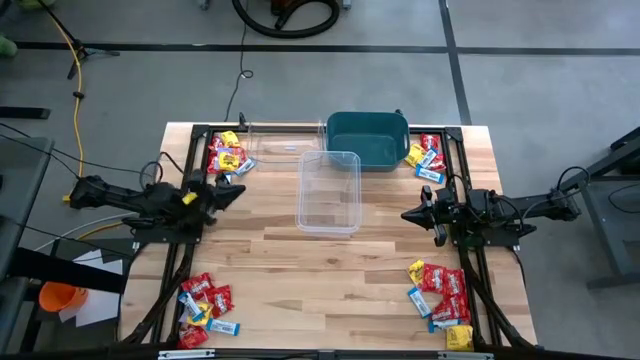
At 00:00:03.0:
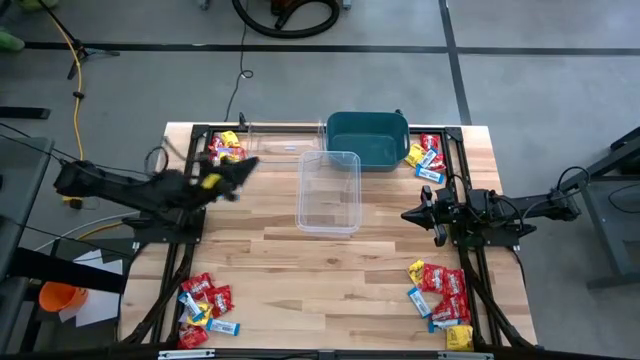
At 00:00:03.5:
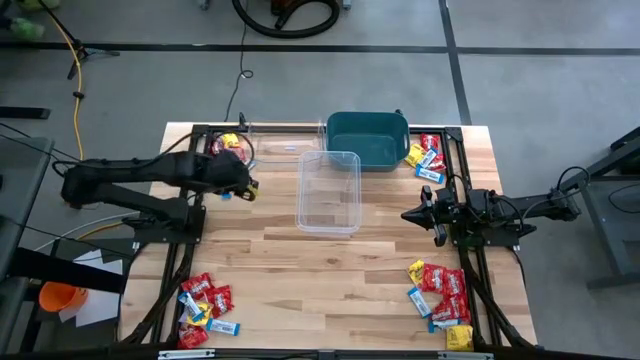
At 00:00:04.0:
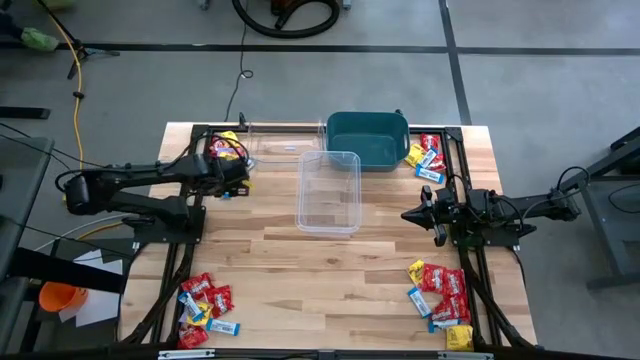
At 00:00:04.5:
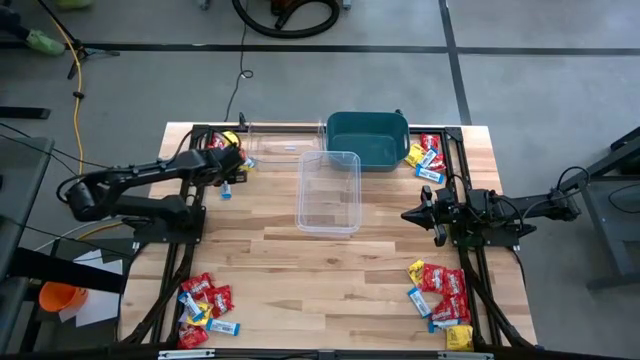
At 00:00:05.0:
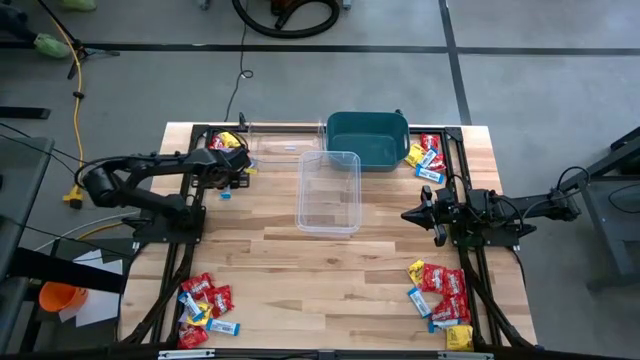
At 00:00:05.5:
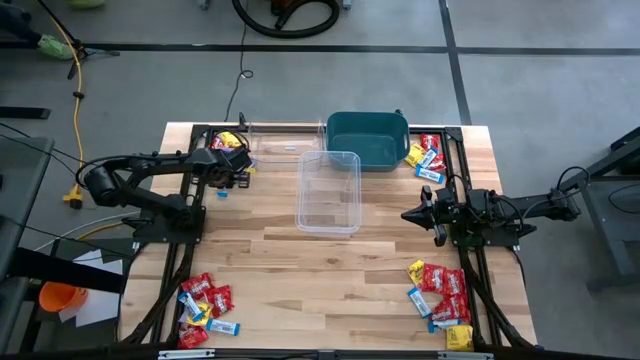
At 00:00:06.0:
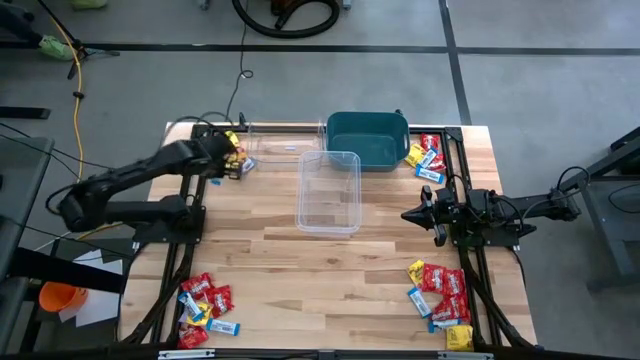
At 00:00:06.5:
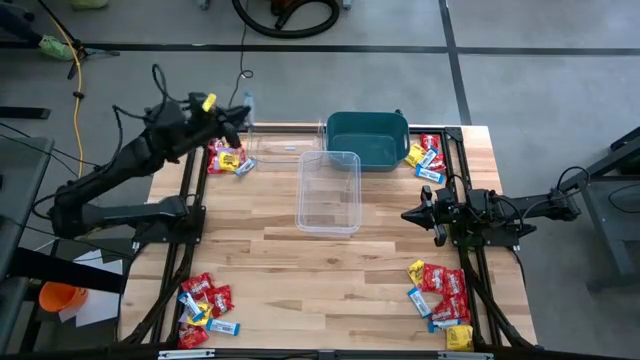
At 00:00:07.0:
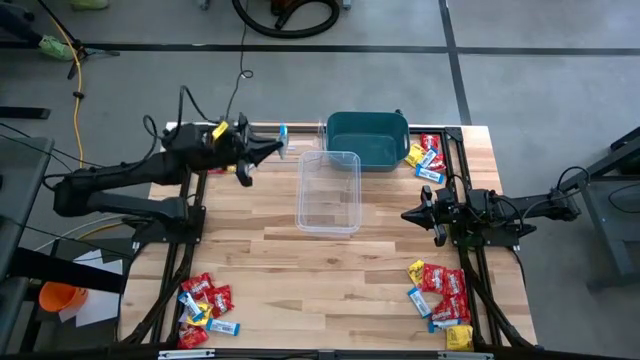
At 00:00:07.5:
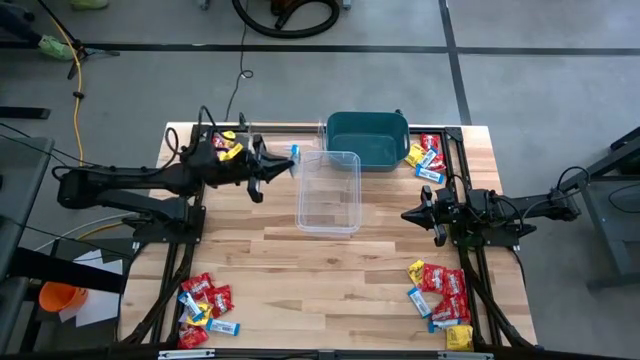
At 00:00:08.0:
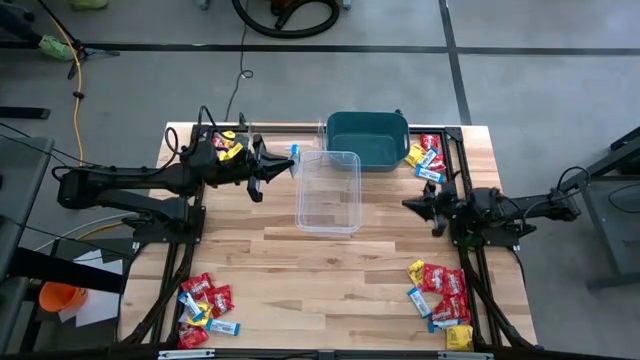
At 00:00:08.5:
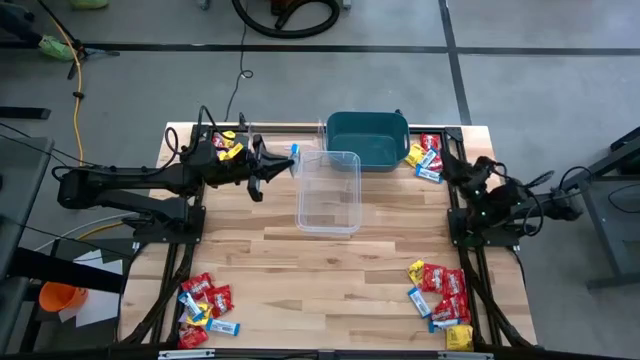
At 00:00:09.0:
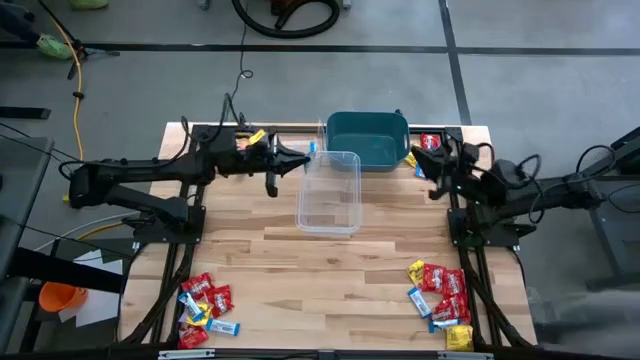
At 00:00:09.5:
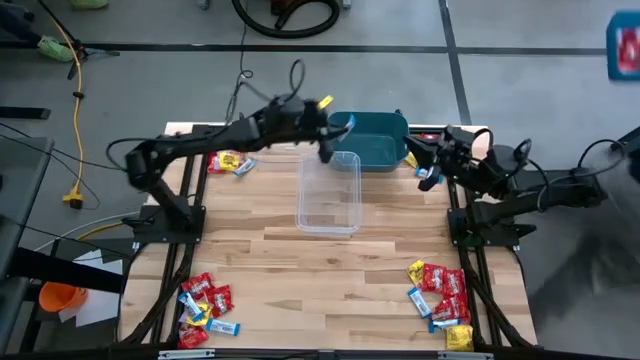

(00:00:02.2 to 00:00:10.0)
Task: Sort candy
Put the white chocolate into the blue bin

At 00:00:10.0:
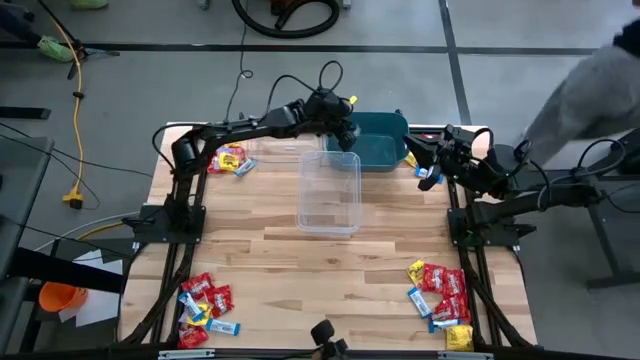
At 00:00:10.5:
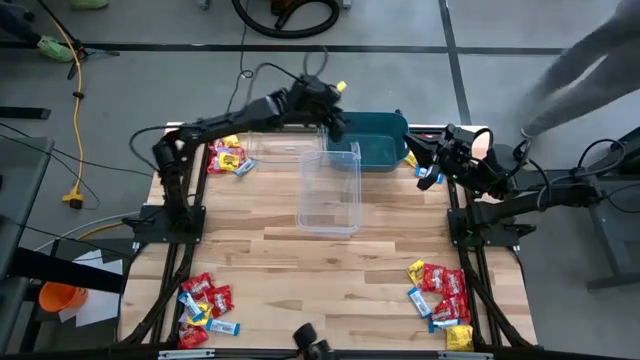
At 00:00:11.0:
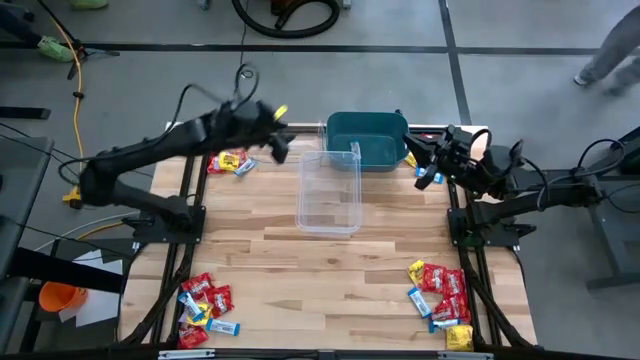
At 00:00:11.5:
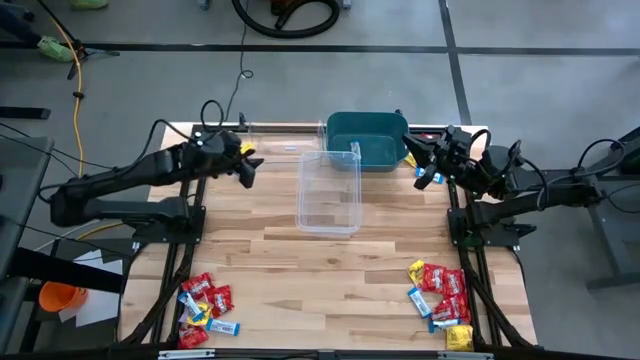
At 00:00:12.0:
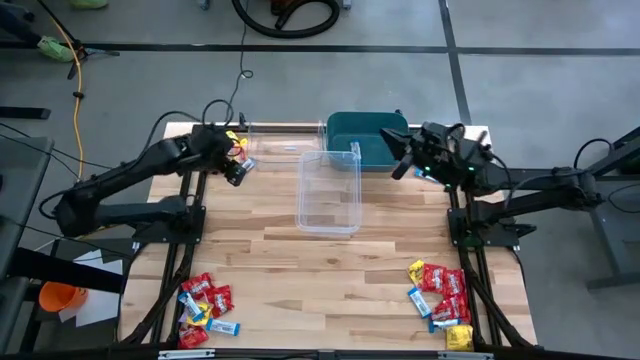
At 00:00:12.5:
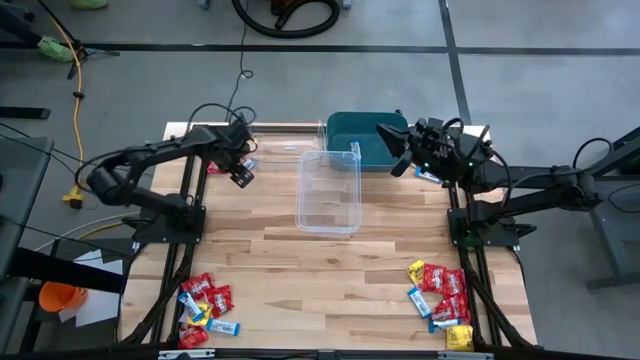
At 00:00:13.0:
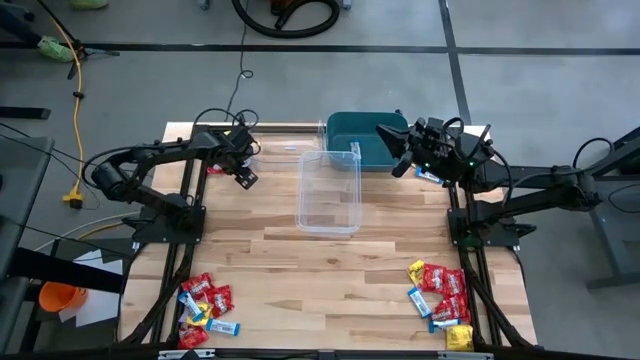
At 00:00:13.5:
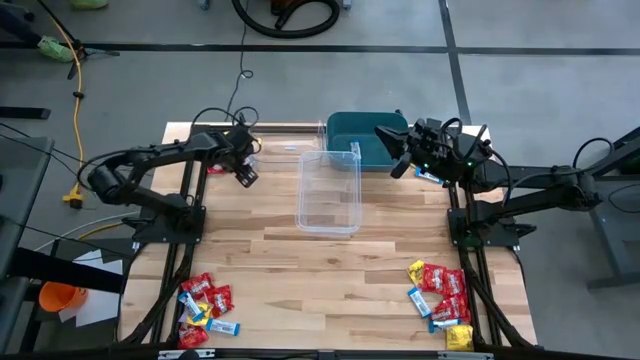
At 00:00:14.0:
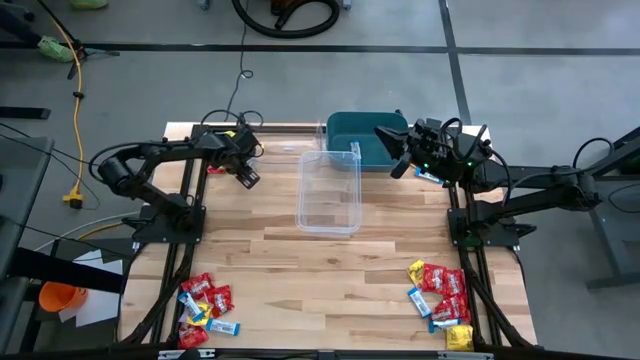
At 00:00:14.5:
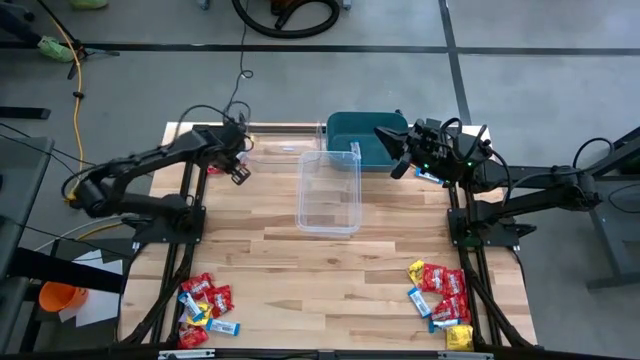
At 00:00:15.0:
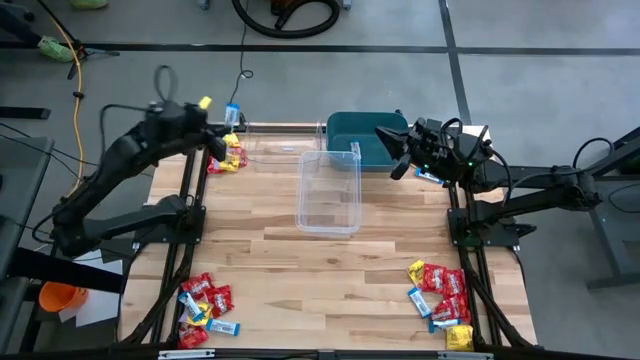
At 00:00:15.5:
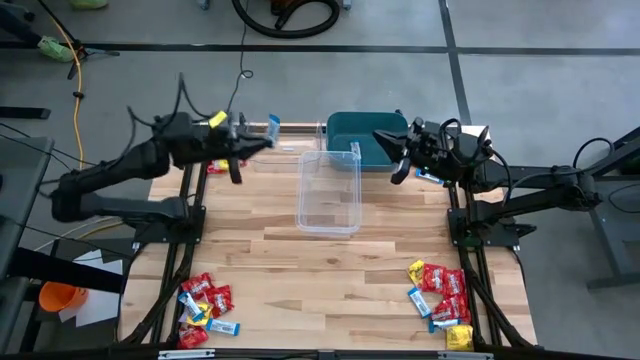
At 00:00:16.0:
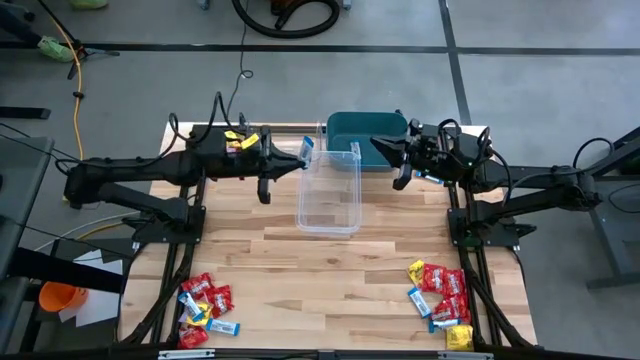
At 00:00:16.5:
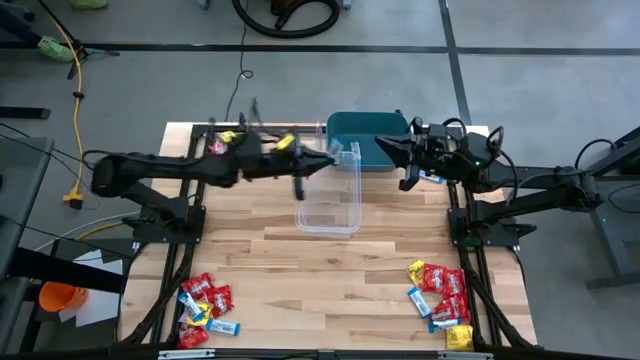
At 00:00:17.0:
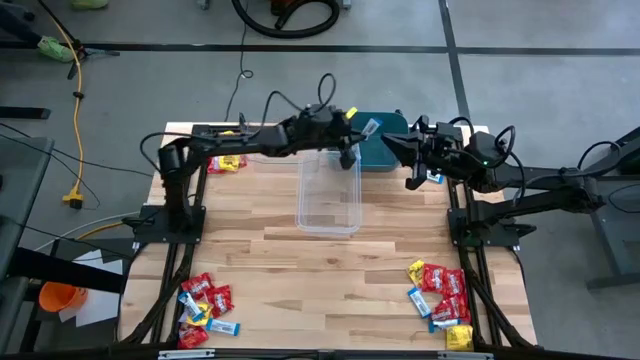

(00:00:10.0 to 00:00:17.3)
Put the white chocolate into the blue bin

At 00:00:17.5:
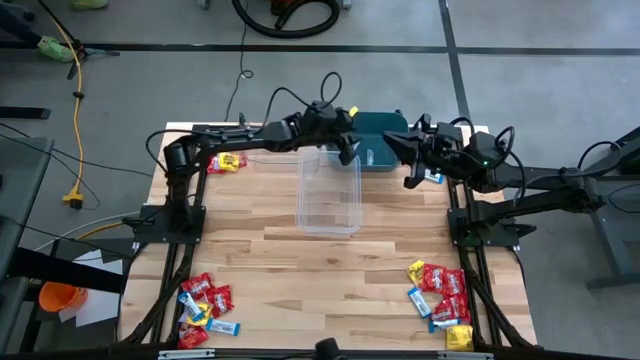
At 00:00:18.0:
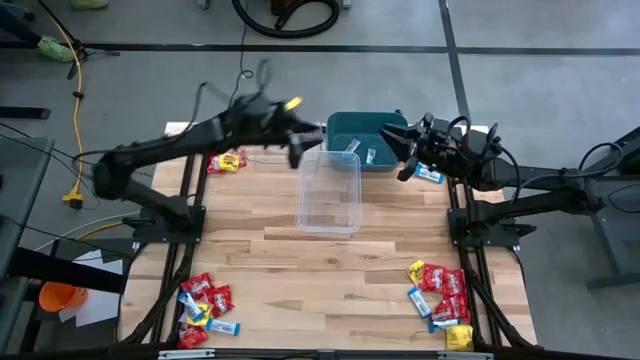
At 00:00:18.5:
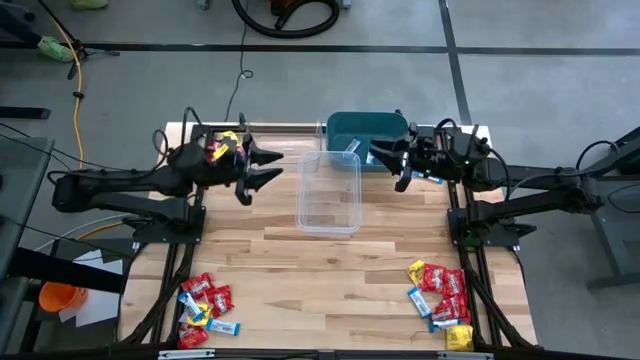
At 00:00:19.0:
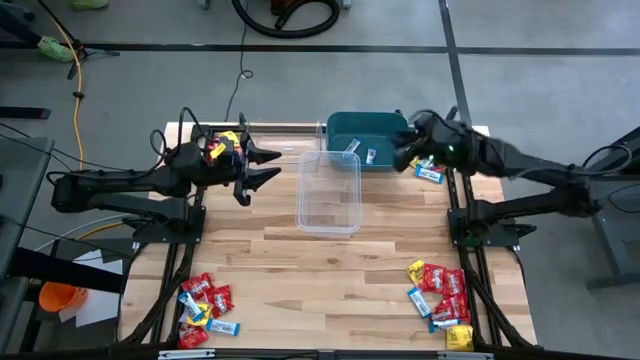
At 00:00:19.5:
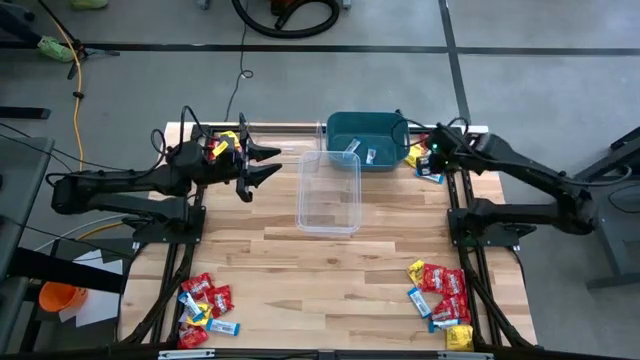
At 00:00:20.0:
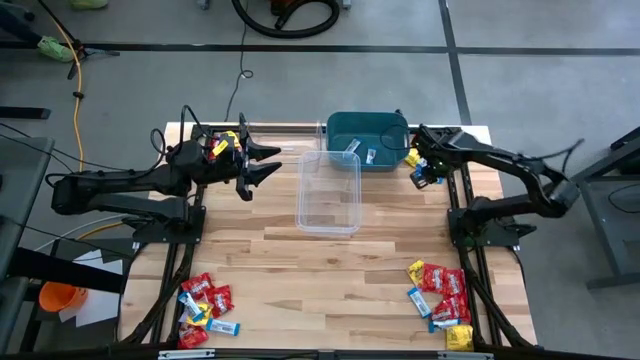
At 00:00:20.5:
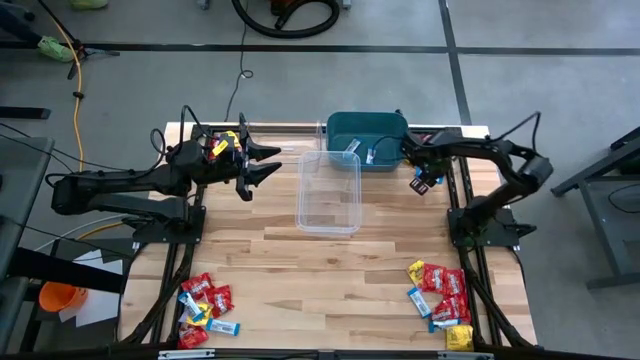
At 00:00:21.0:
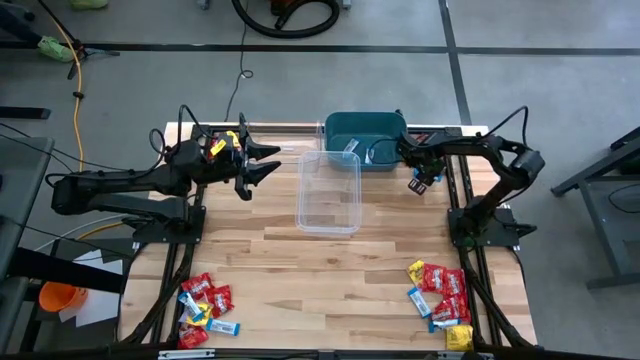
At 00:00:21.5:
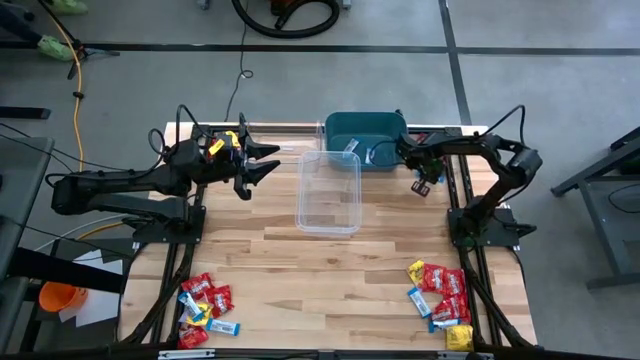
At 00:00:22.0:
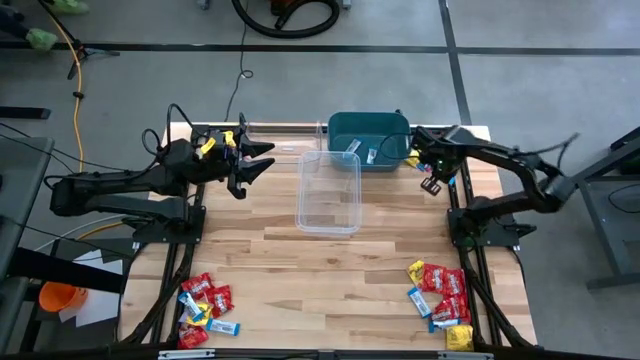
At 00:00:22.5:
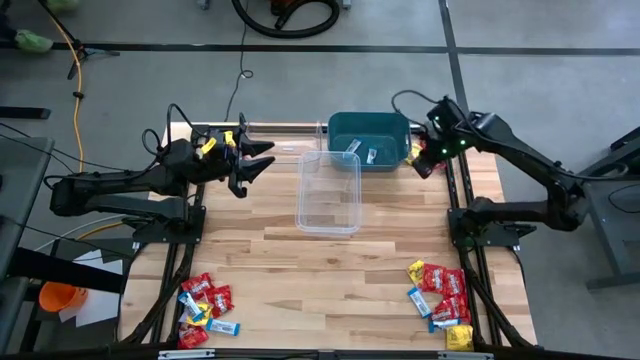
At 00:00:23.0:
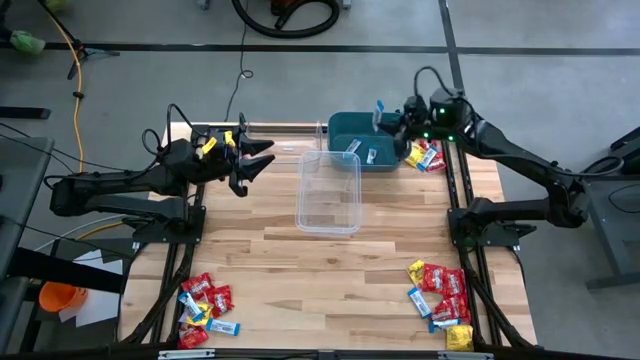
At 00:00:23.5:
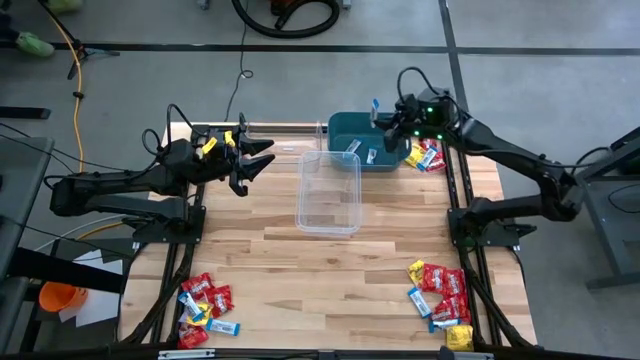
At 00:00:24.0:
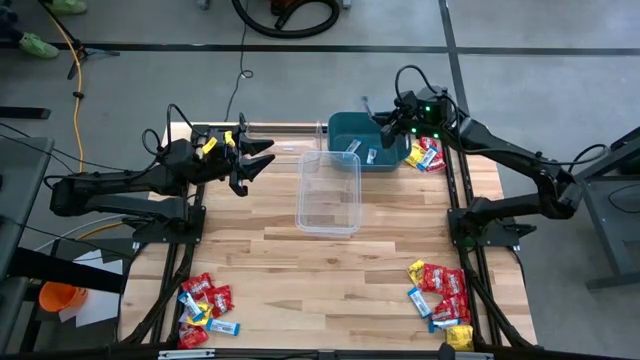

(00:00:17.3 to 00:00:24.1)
Put the white chocolate into the blue bin
